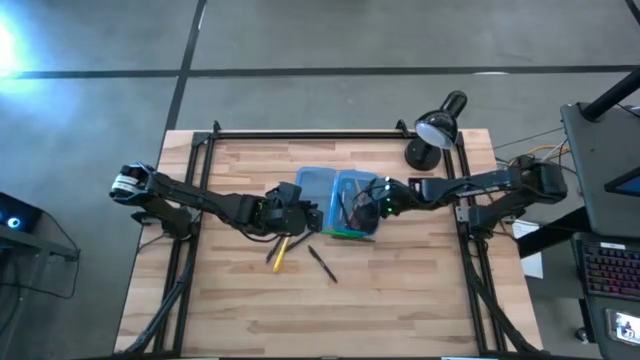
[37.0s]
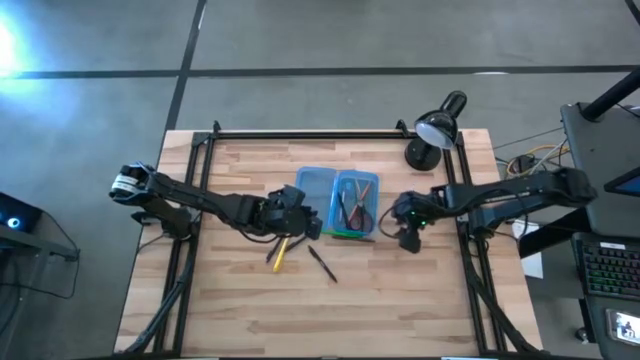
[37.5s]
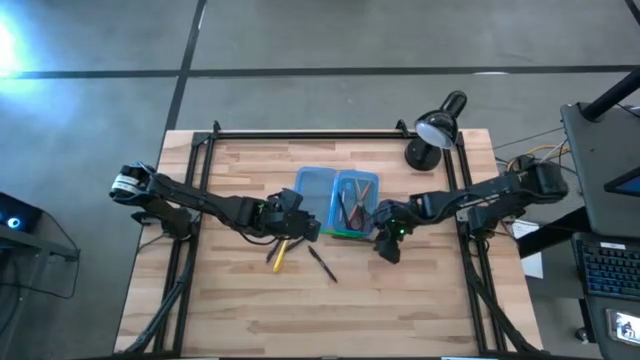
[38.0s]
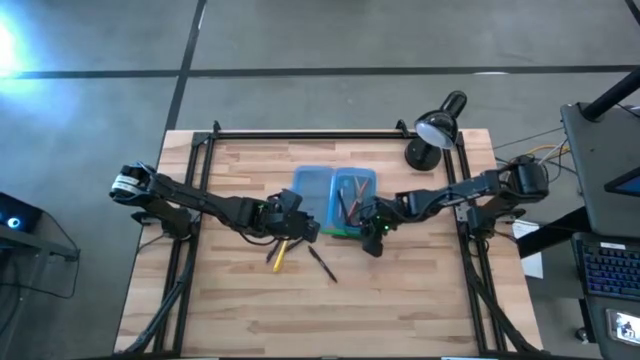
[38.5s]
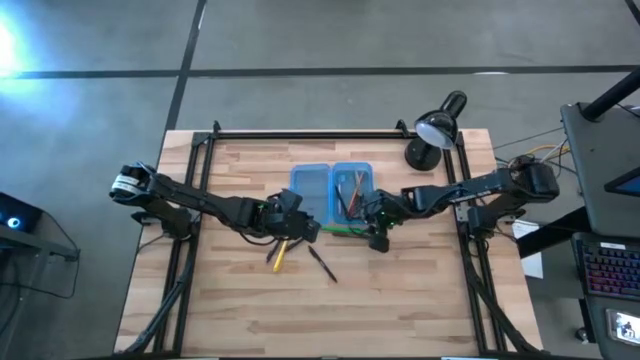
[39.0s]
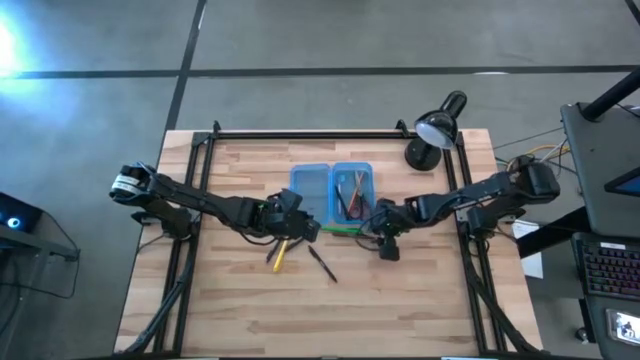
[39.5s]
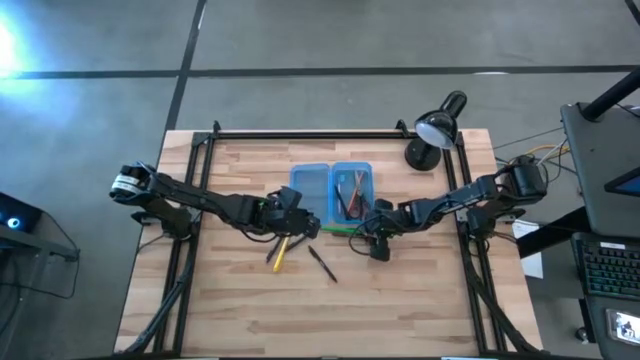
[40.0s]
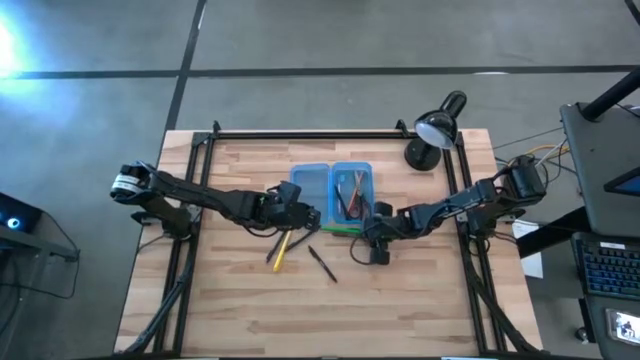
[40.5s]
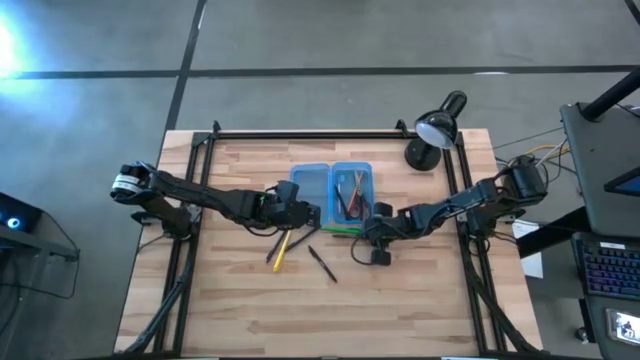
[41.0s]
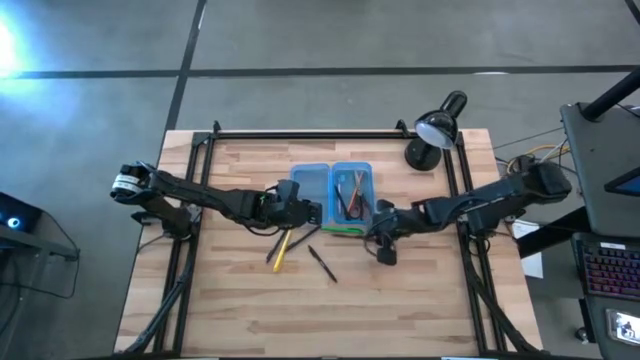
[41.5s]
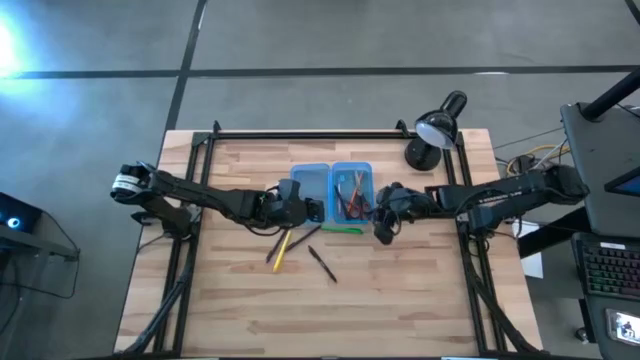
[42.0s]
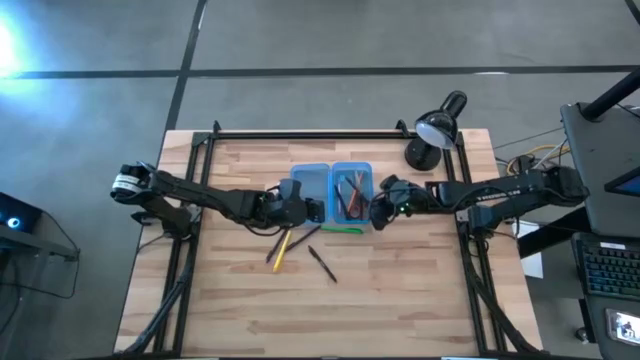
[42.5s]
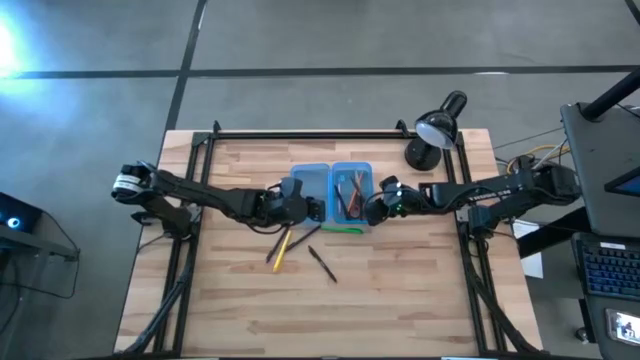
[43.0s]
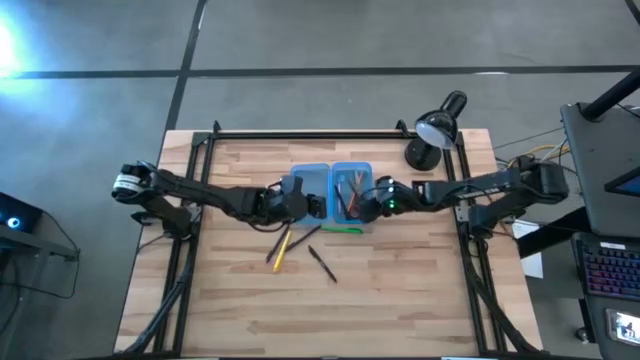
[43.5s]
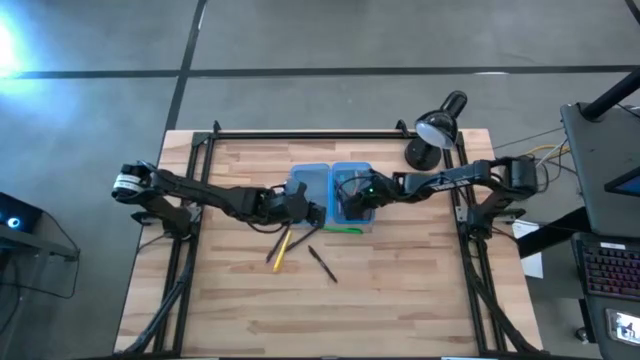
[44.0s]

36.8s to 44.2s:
Task: Pick & place school supplies into a supply box
Put the brown pen into the supply box

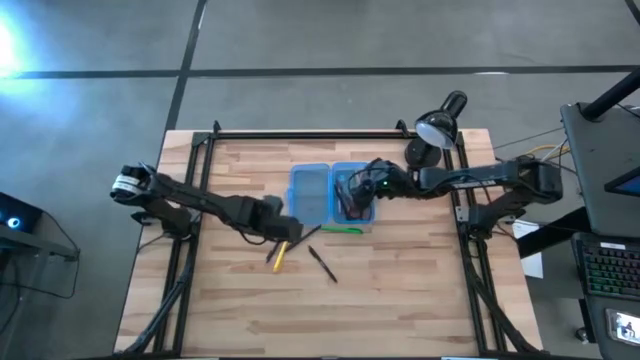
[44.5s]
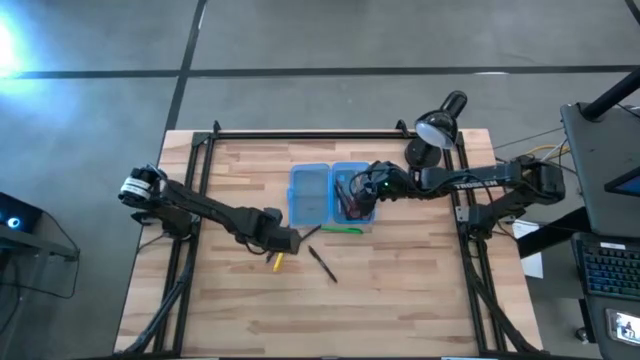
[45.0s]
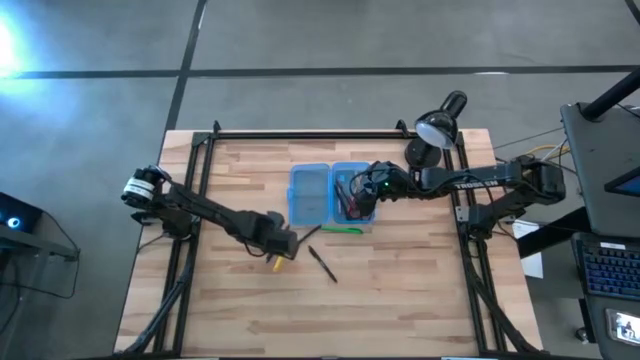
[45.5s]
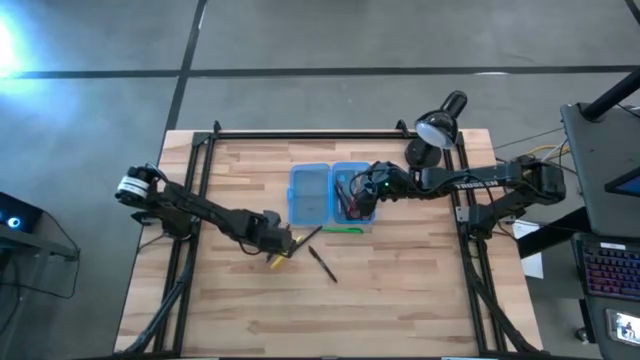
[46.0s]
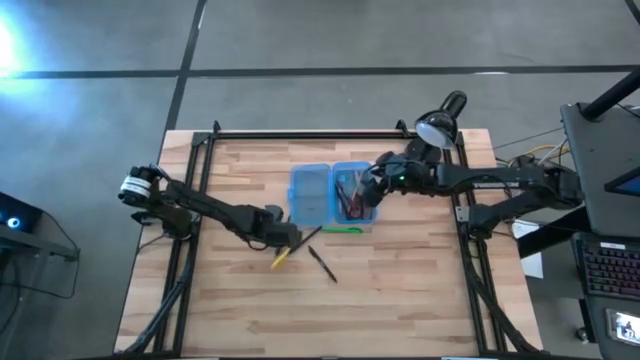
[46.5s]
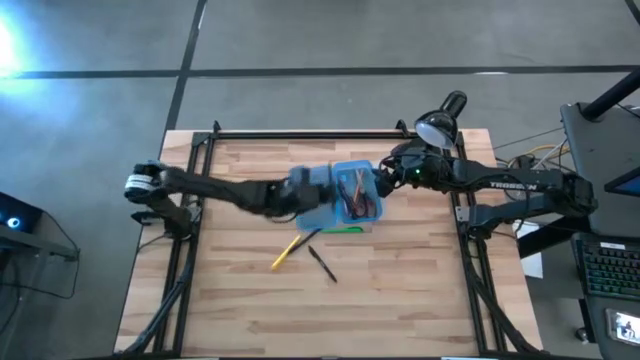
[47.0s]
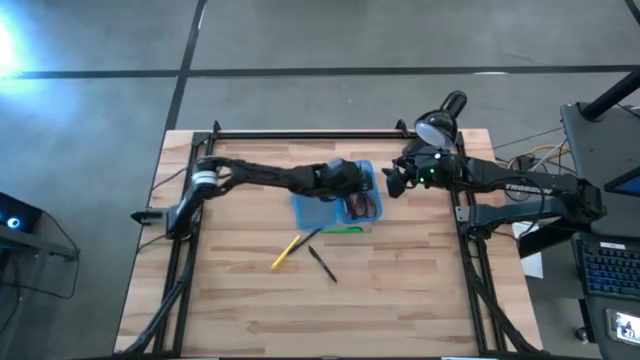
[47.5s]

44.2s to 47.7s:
Put the black pen into the supply box

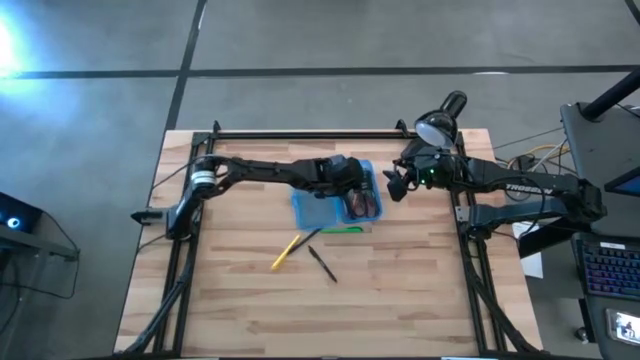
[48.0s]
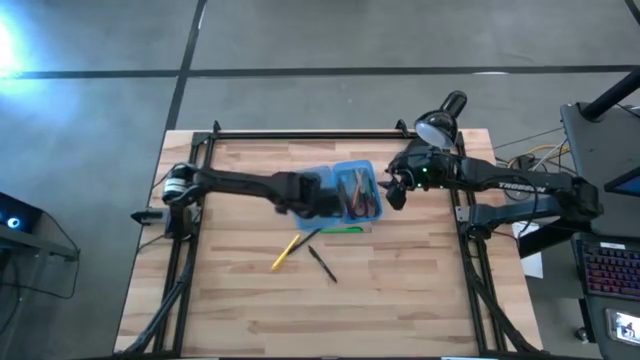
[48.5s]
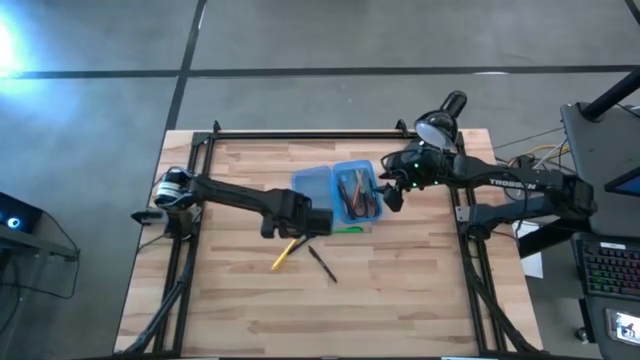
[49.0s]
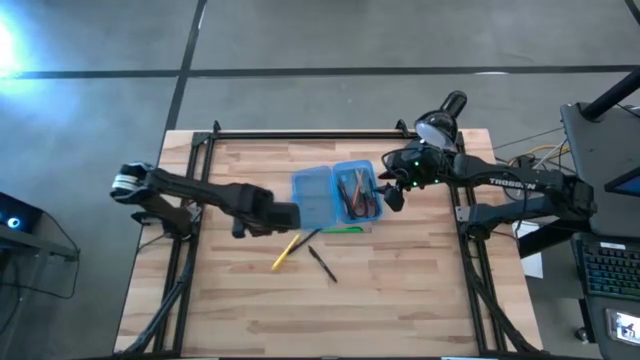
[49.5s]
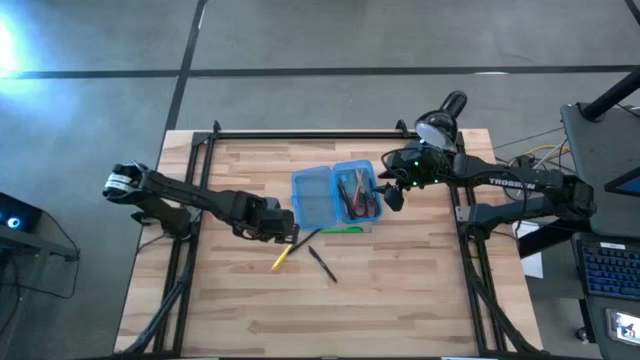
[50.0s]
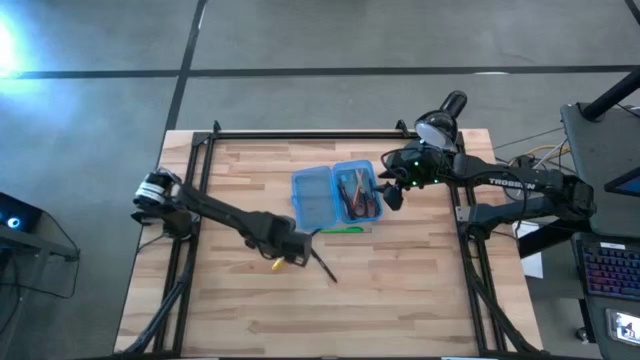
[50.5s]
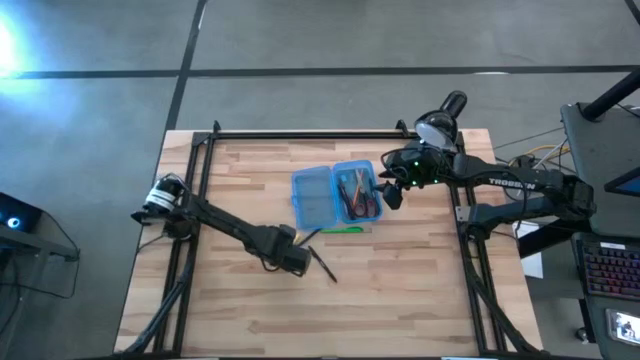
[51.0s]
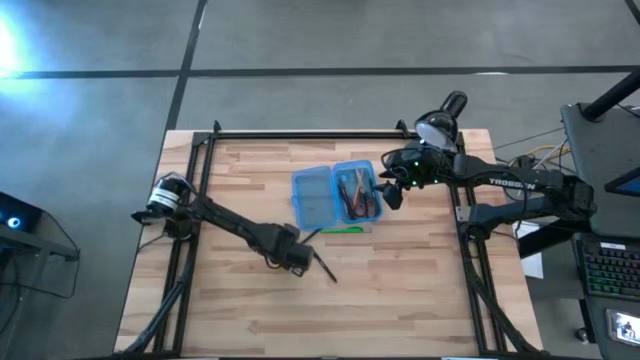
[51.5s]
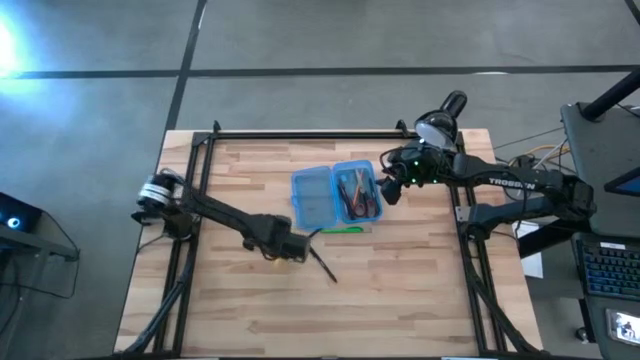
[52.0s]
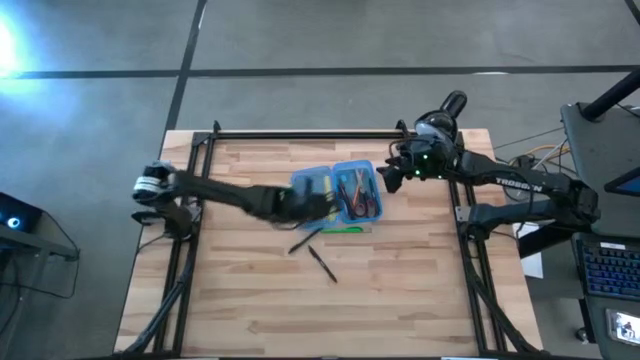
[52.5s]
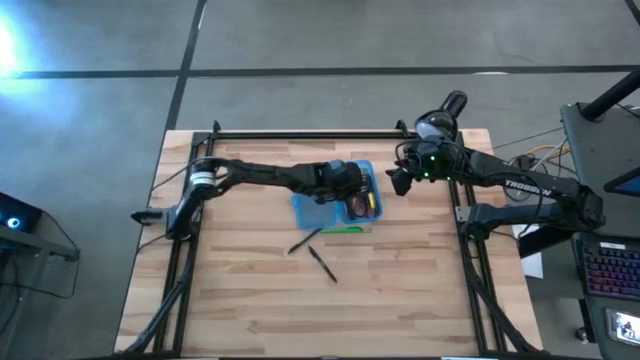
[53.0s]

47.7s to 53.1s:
Put the yellow pen into the supply box

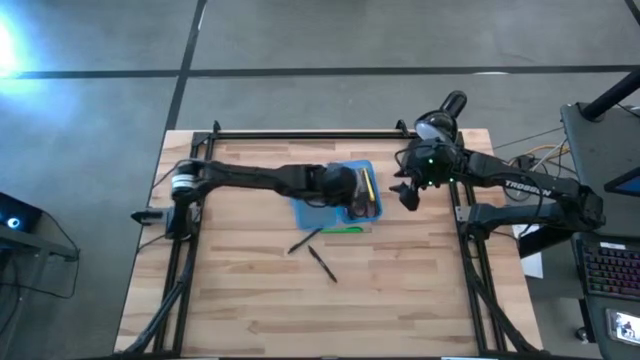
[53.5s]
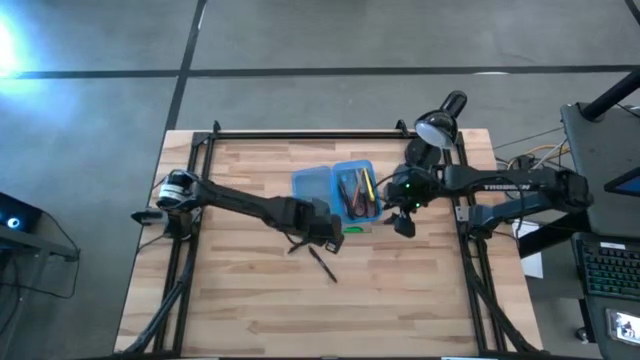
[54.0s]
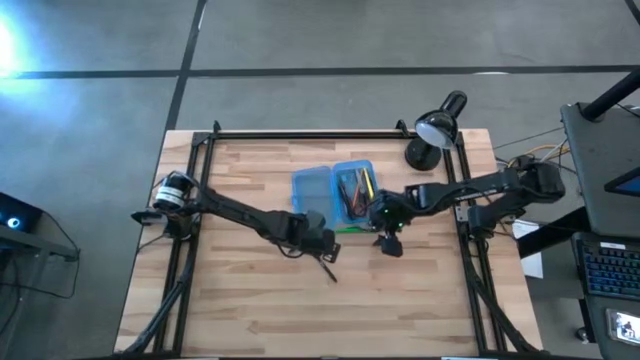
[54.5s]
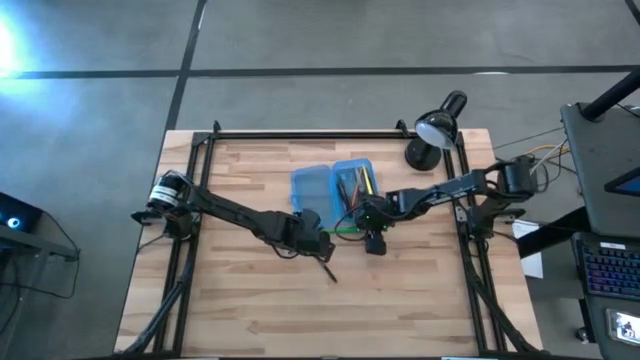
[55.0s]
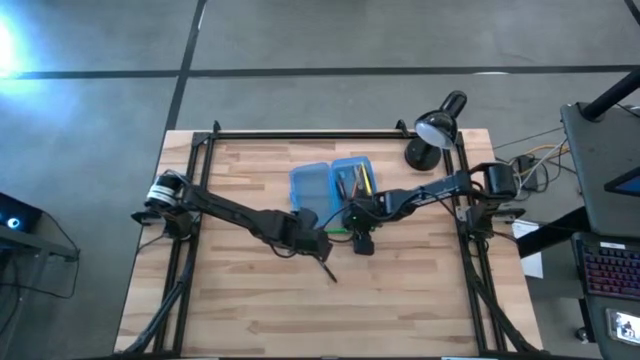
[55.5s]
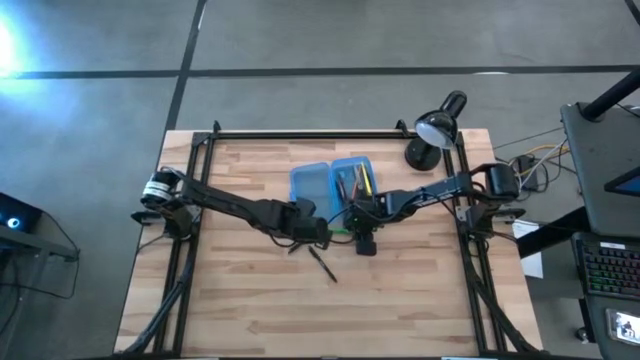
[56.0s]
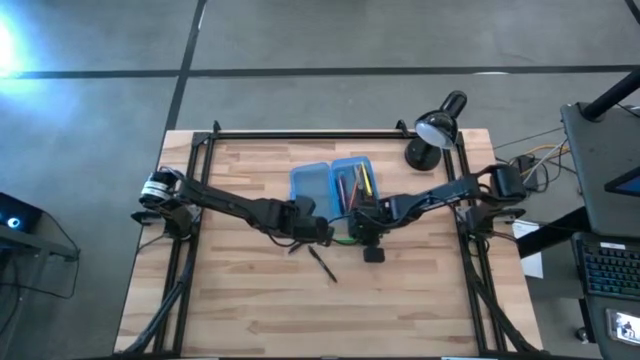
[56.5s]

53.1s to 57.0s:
Put the green pen into the supply box

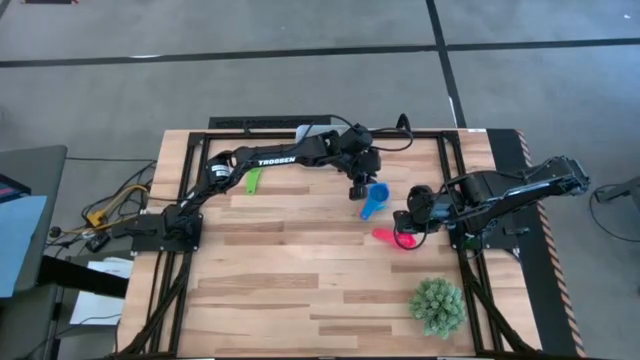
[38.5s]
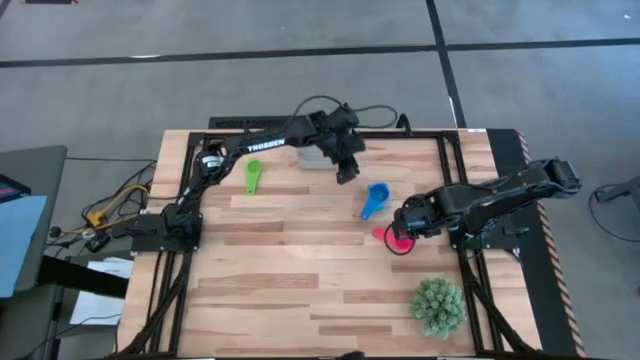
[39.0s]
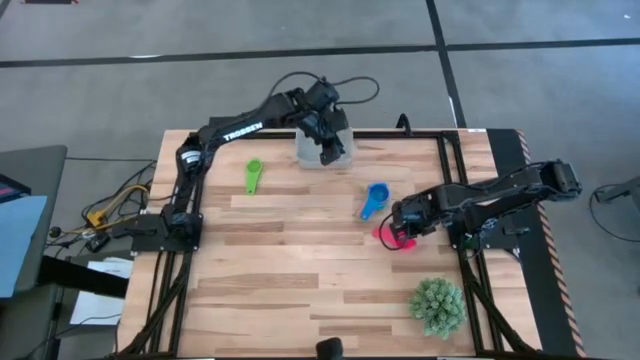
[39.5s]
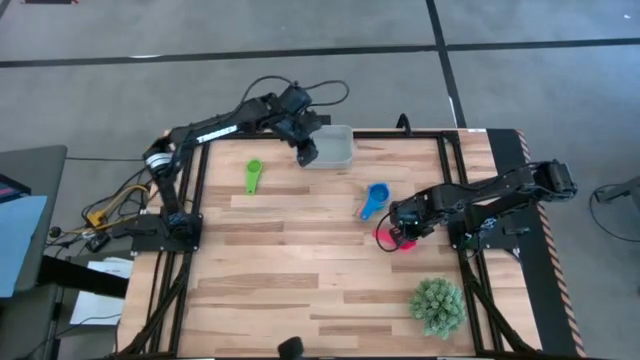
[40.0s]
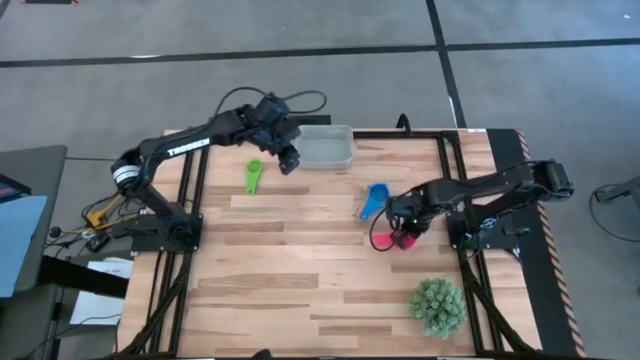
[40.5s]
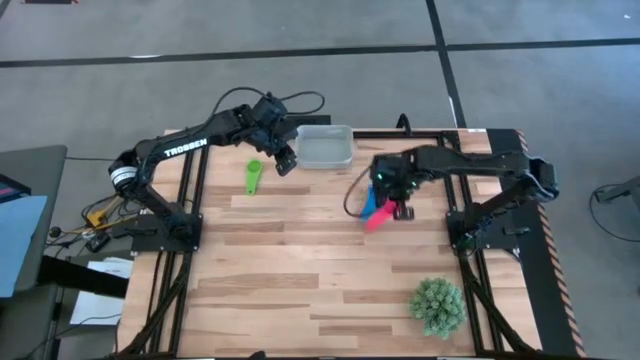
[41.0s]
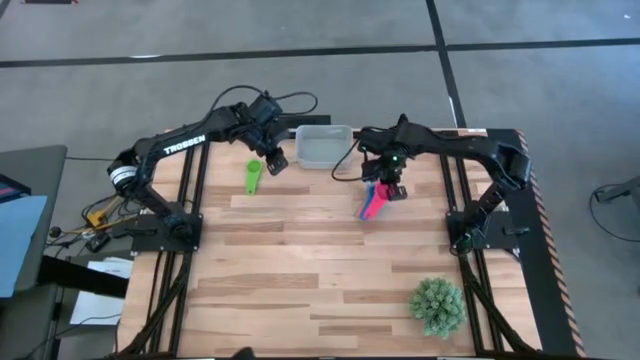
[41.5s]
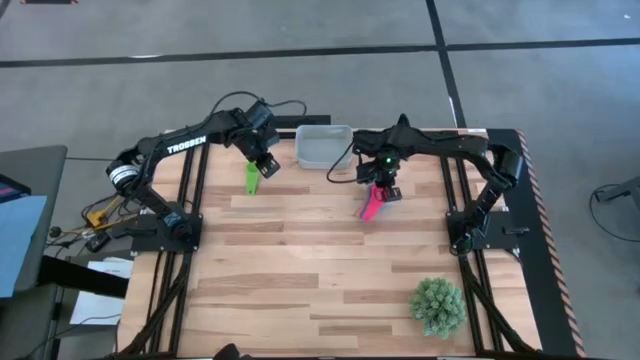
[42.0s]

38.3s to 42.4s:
Task: Nest measuring cups in basket
Stack the red measuring cup on top of the blue measuring cup
